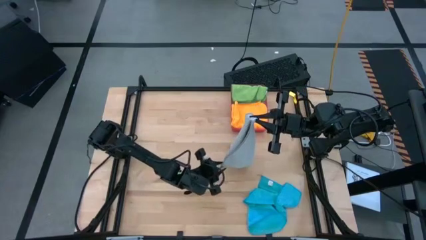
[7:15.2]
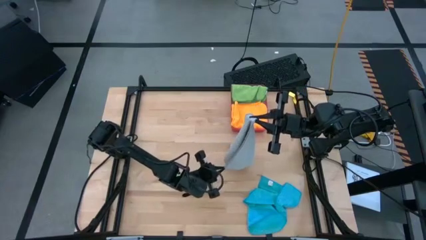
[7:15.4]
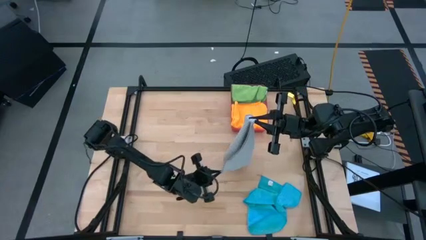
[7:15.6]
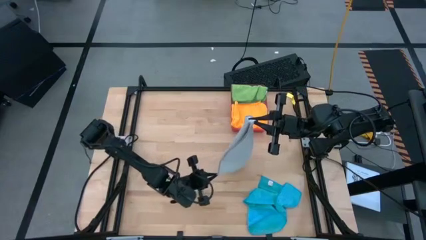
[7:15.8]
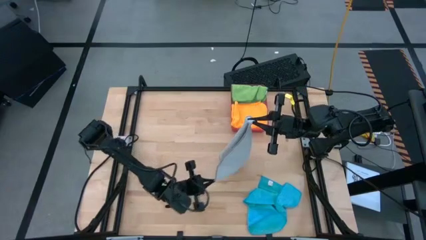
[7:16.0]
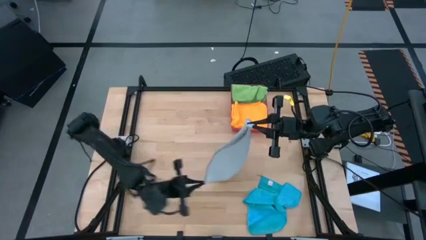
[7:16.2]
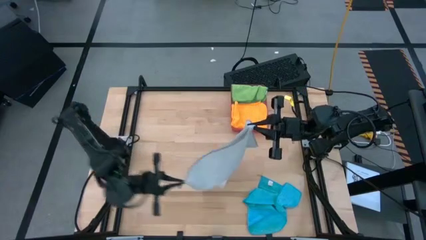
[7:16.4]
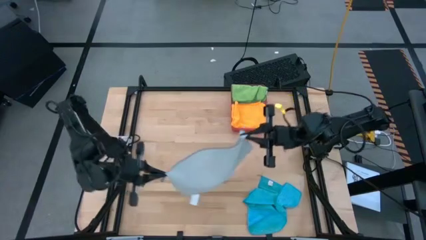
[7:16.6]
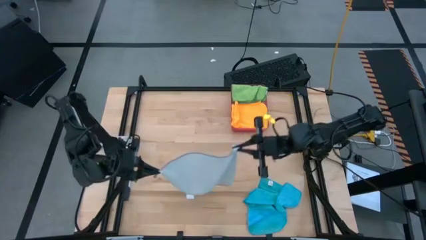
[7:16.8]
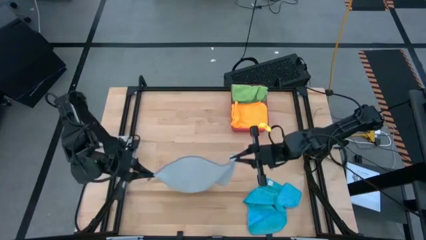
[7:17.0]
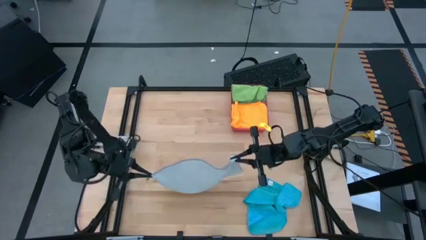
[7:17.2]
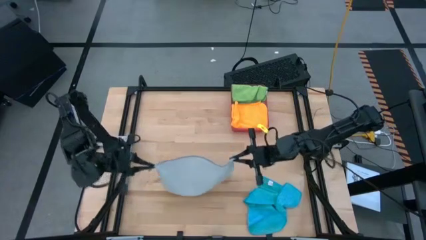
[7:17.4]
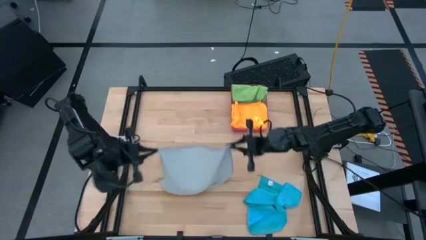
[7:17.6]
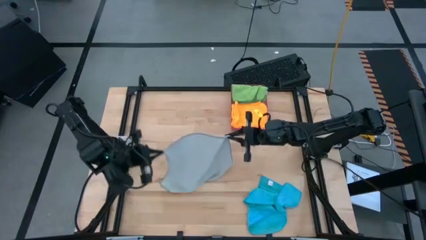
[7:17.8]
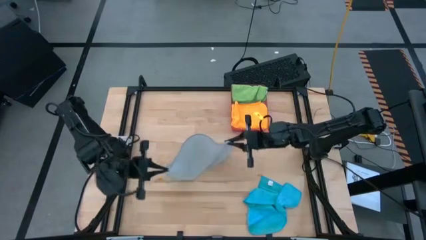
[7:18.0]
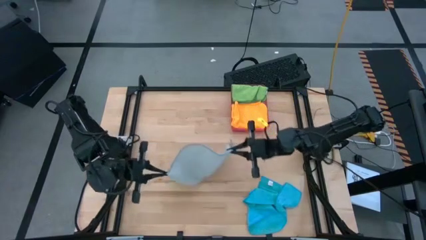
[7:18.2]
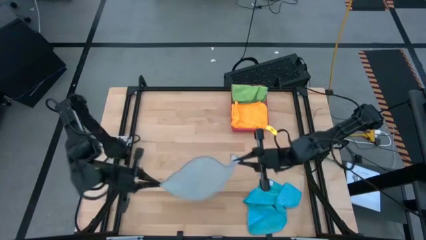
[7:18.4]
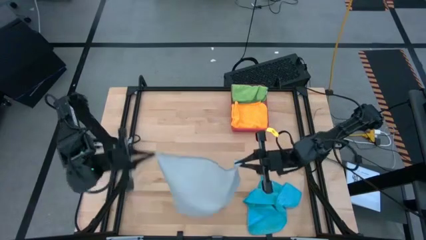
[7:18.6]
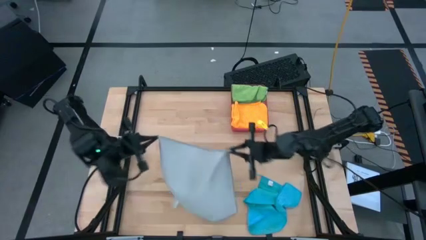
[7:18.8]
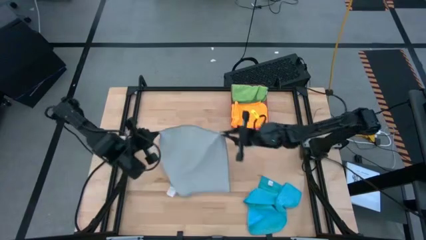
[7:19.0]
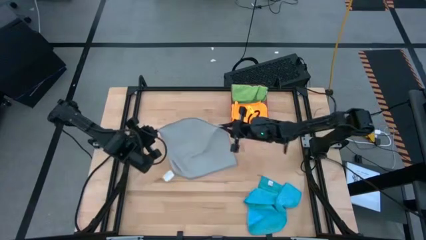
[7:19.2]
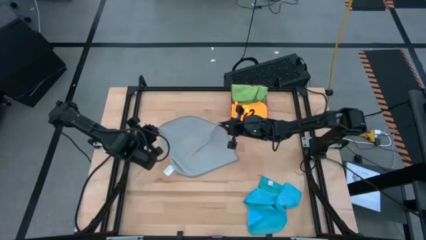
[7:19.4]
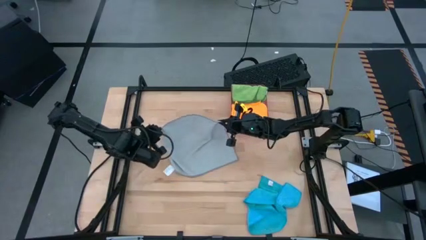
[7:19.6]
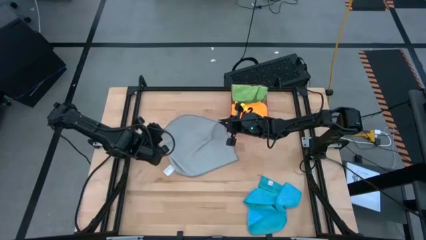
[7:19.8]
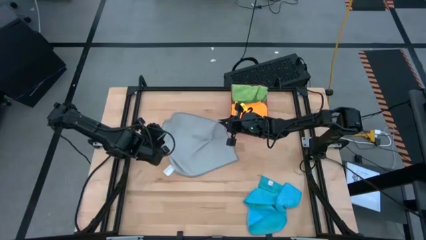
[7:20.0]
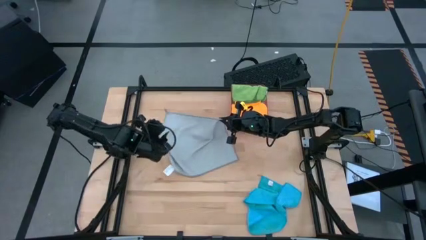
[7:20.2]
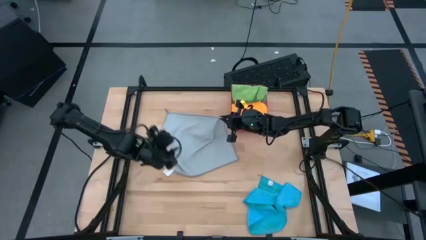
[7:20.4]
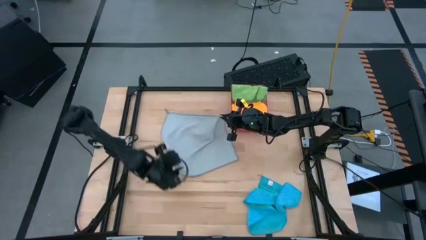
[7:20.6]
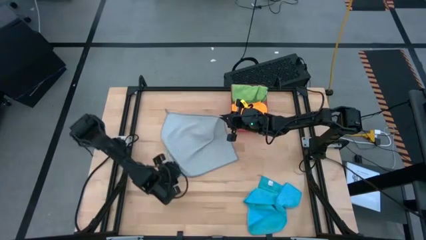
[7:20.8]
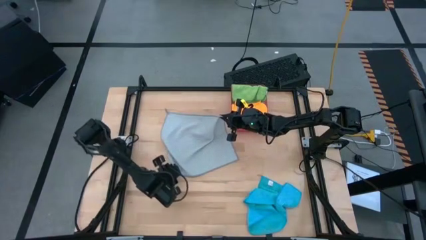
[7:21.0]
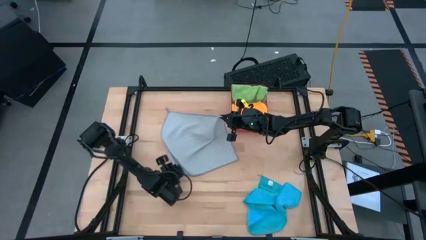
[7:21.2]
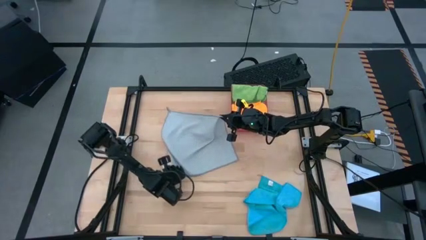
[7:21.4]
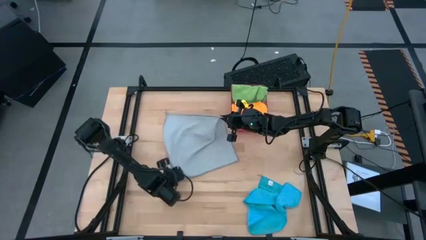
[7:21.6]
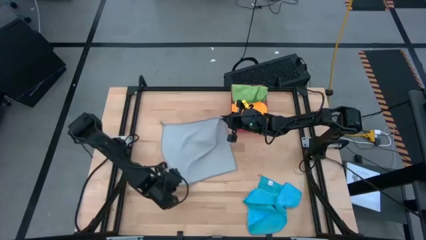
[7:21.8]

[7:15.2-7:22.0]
Task: Fold microfiber towels
Fold the gray microfiber cloth

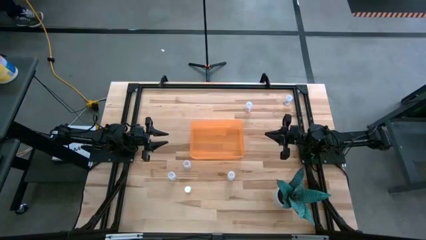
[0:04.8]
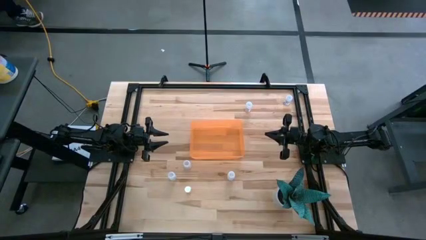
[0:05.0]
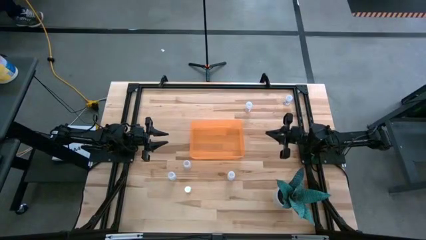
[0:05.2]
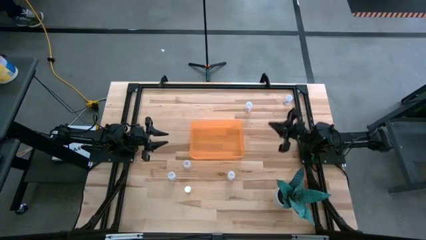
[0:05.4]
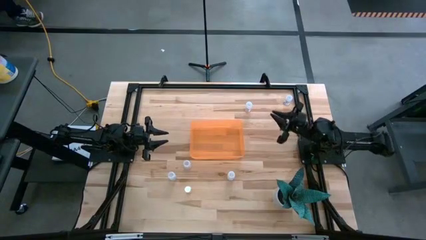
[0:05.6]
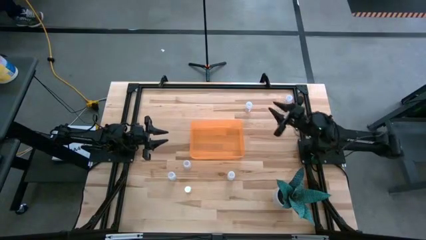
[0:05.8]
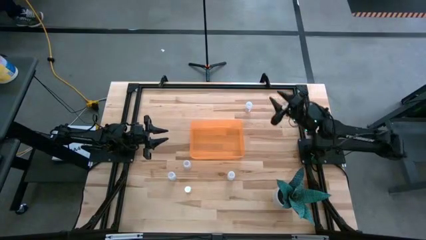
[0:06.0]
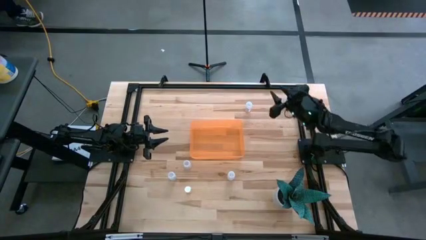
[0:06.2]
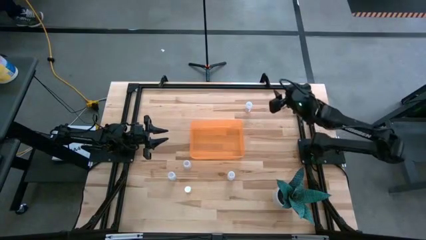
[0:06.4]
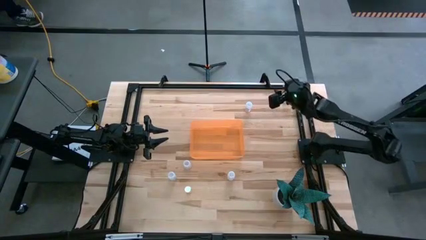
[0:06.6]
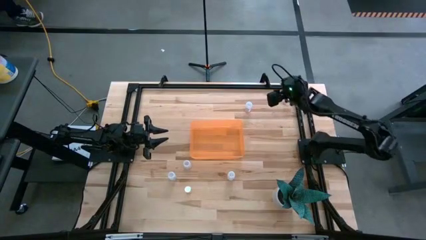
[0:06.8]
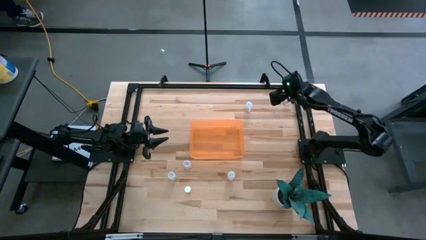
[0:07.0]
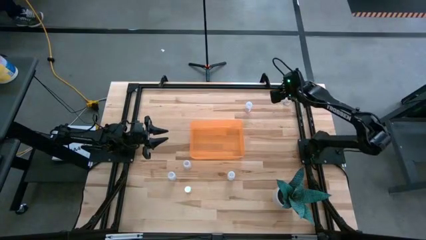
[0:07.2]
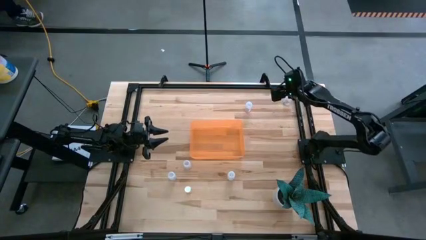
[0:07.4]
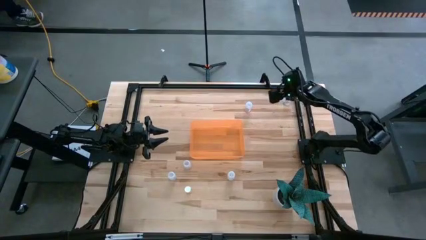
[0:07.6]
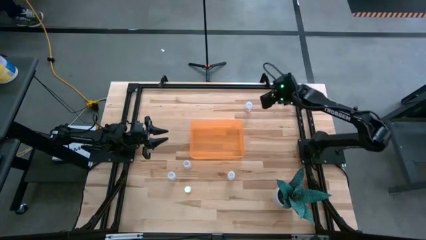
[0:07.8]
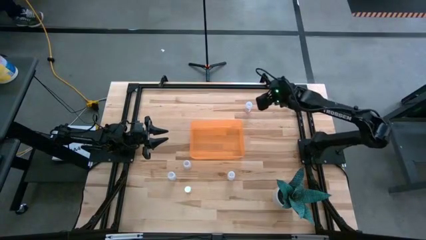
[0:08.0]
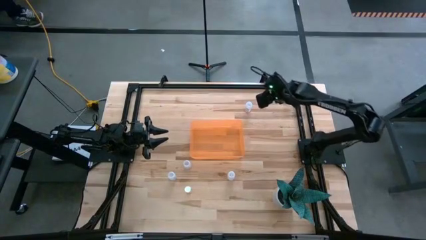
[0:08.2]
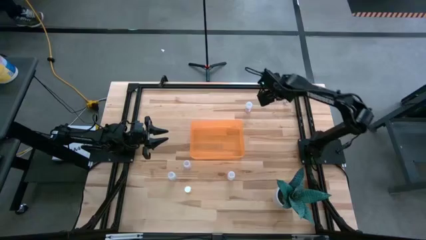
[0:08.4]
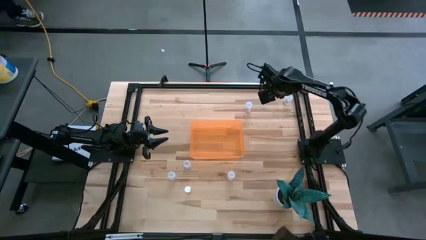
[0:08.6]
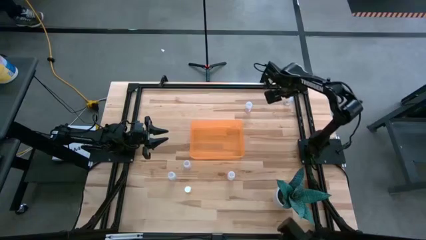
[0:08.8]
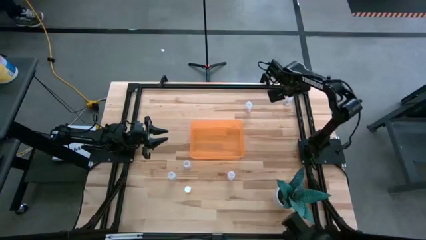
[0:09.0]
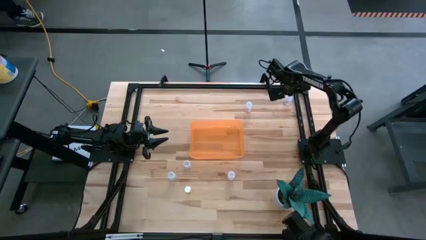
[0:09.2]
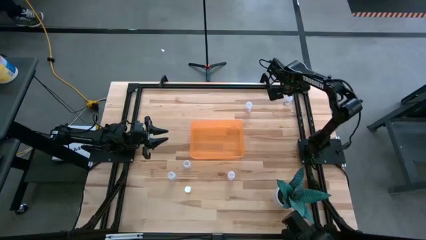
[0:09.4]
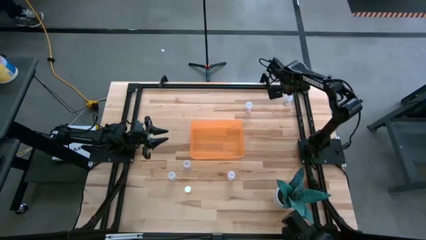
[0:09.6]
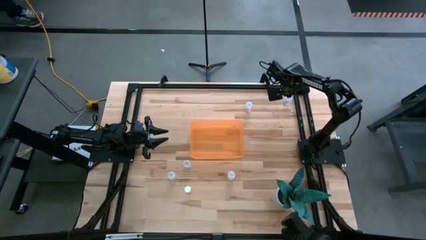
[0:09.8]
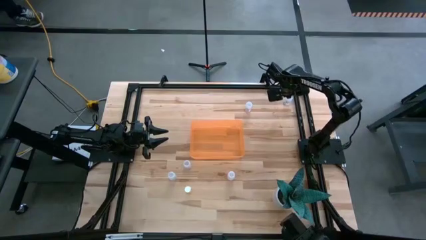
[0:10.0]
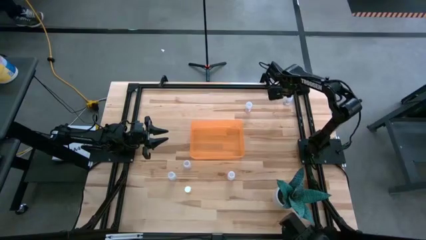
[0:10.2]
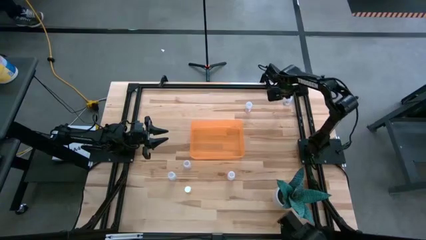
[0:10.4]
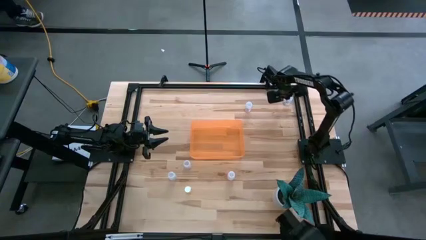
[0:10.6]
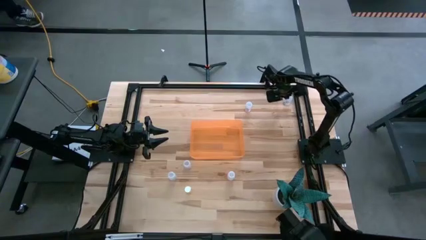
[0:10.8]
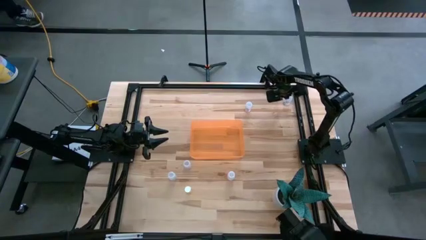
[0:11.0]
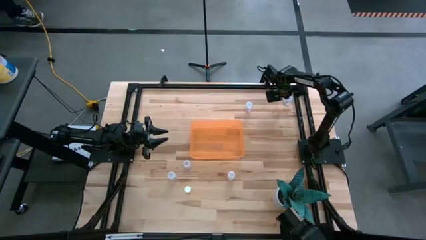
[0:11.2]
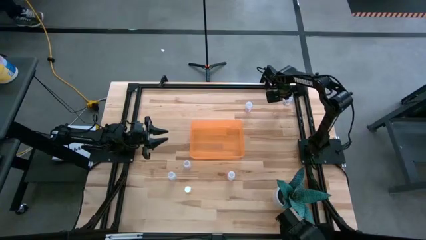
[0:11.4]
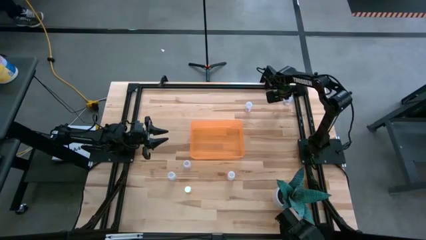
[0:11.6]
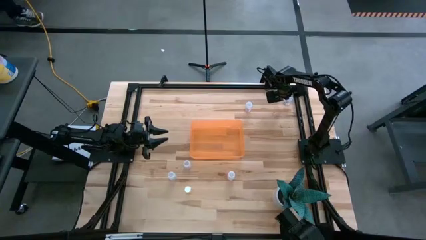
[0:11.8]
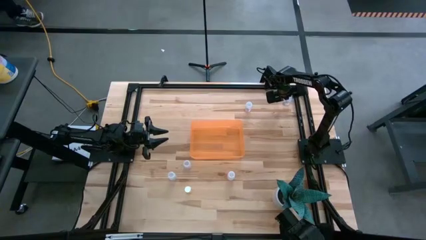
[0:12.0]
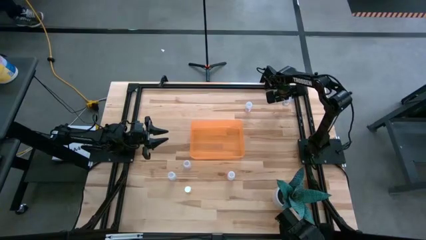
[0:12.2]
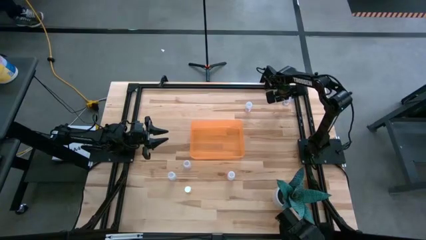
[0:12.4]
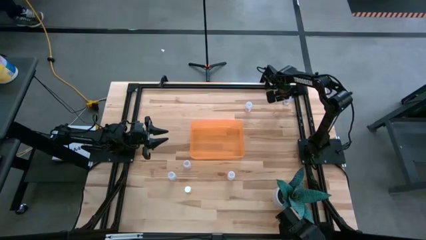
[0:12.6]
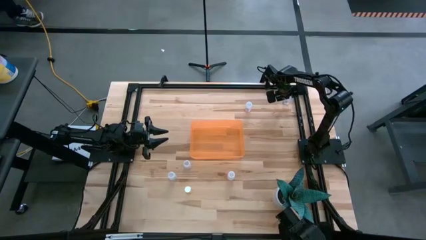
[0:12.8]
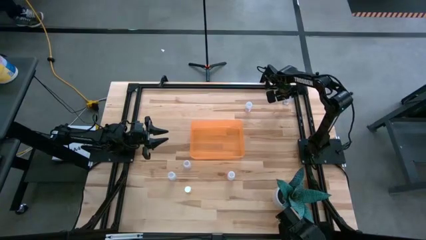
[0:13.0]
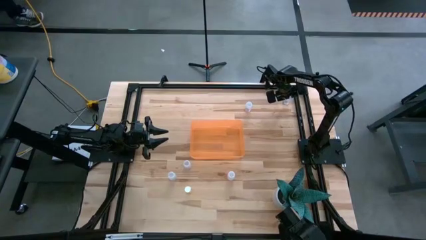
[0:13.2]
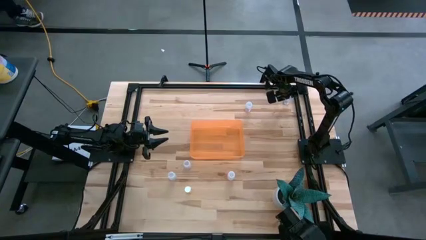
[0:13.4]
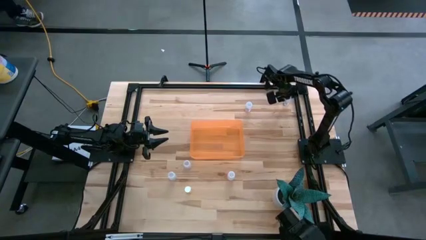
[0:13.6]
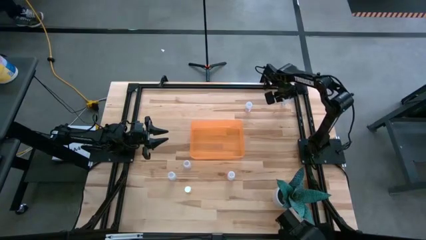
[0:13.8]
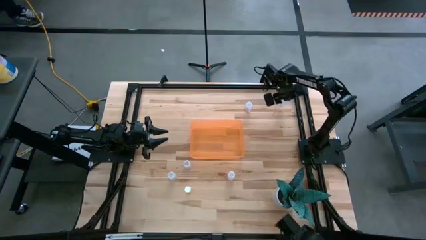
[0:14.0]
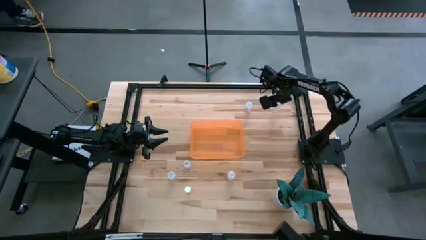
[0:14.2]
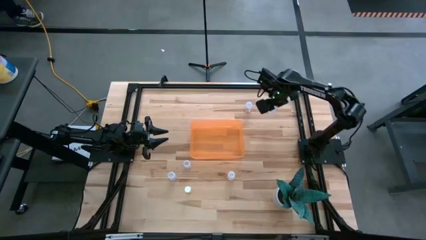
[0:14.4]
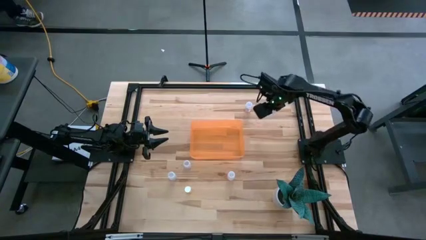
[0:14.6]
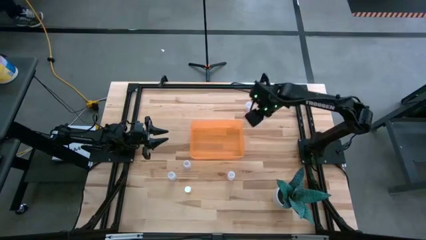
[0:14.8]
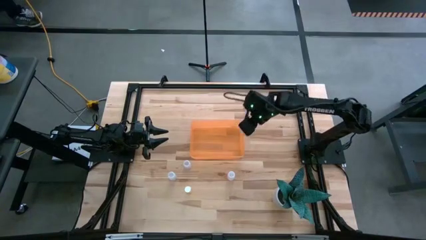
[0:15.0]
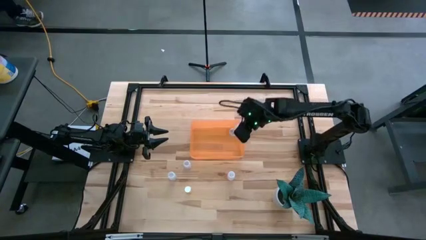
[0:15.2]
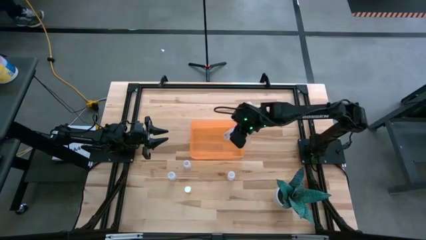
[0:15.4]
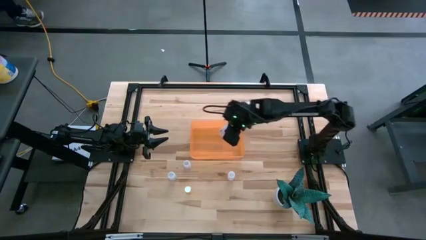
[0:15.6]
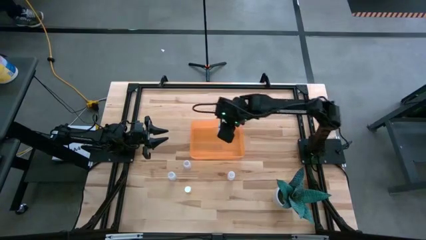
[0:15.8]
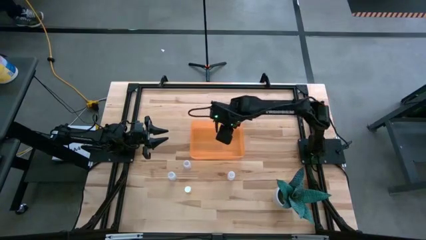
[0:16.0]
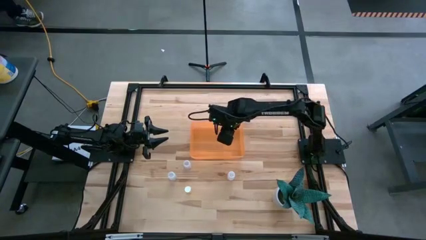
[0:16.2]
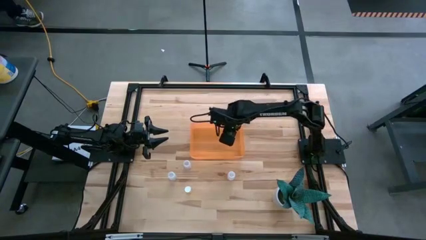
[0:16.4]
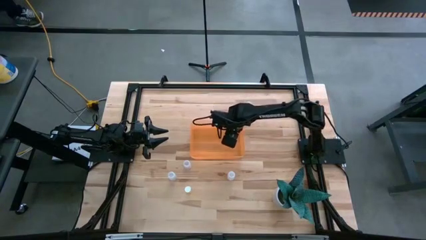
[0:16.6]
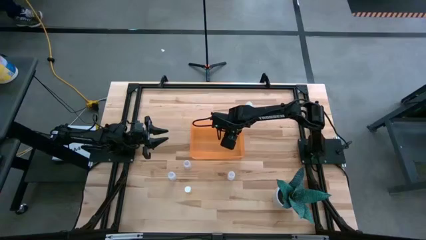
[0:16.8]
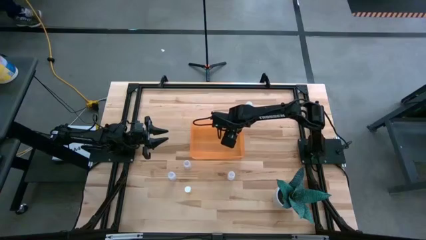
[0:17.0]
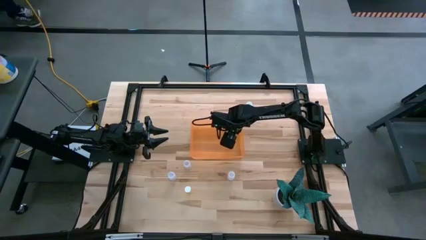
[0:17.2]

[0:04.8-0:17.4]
Task: Pick and place pill bottles into a basket
Put the transparent pill bottle in the orange bin
